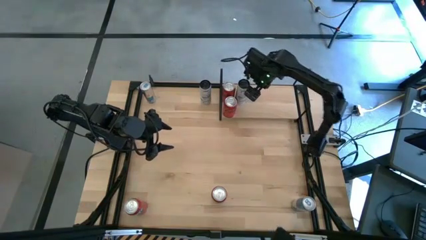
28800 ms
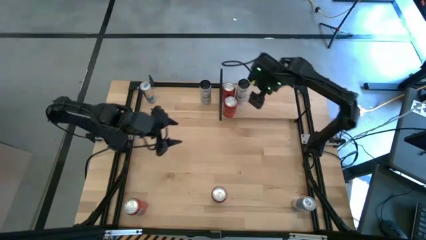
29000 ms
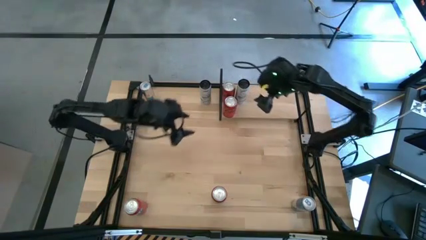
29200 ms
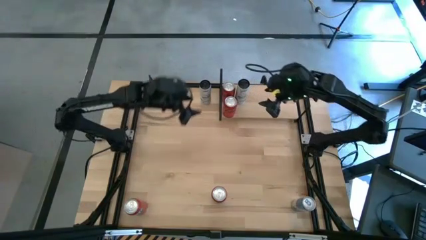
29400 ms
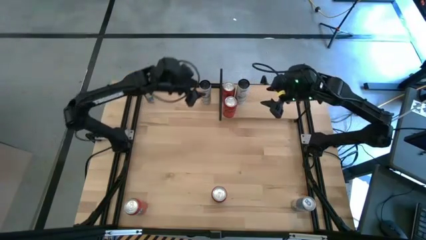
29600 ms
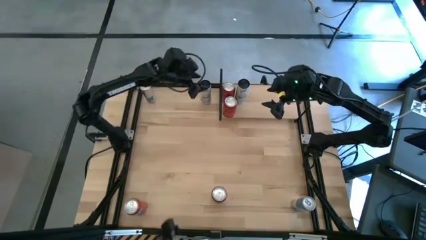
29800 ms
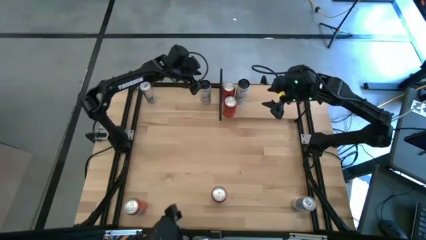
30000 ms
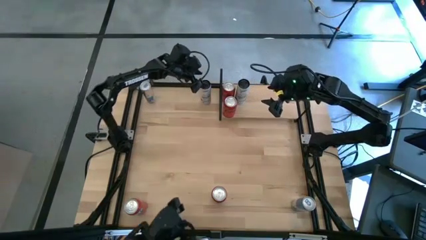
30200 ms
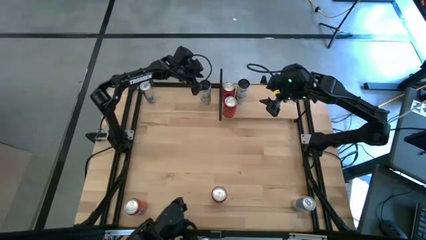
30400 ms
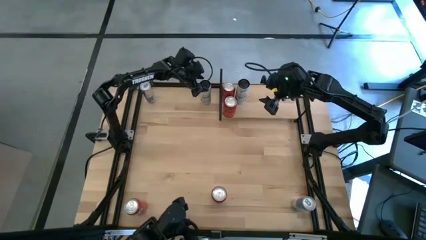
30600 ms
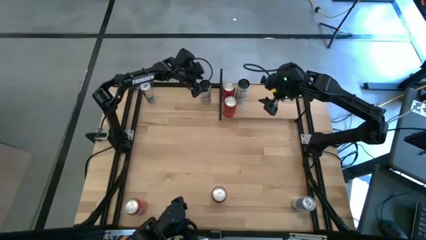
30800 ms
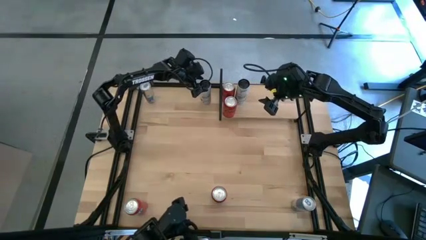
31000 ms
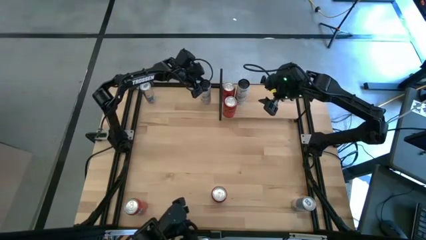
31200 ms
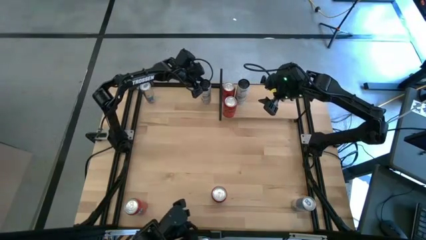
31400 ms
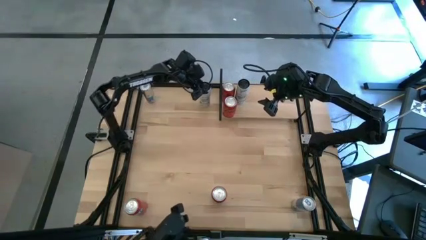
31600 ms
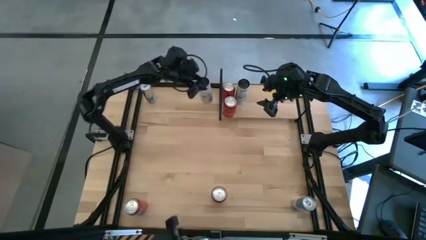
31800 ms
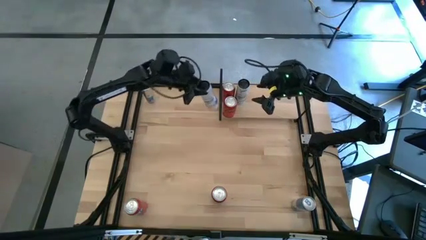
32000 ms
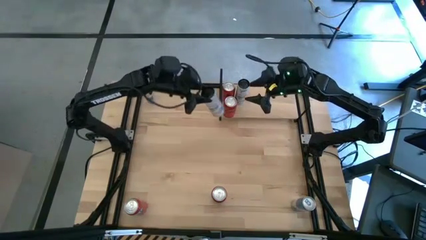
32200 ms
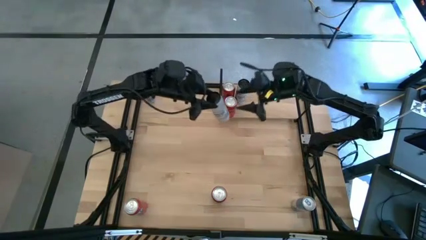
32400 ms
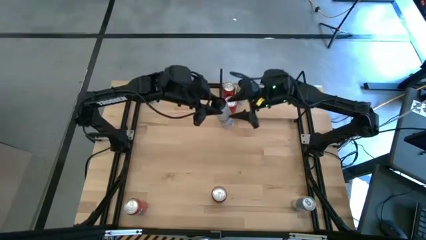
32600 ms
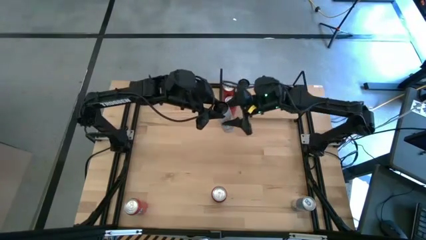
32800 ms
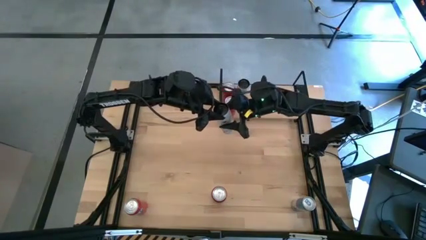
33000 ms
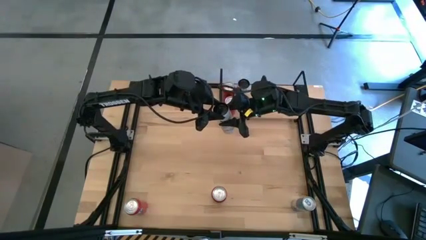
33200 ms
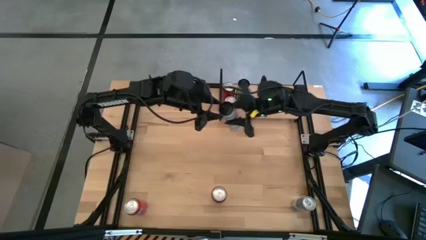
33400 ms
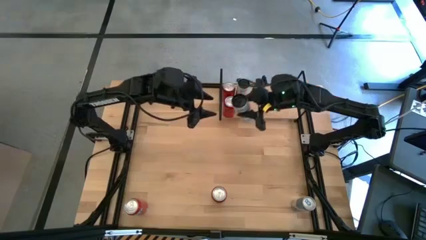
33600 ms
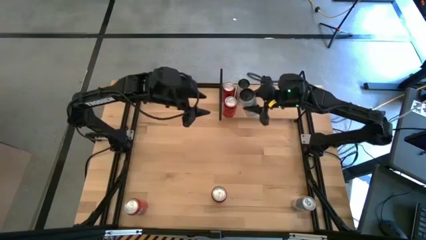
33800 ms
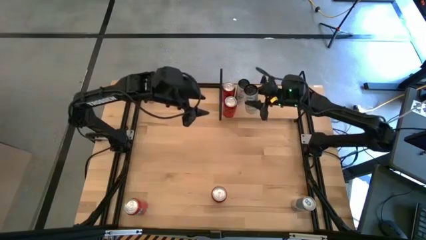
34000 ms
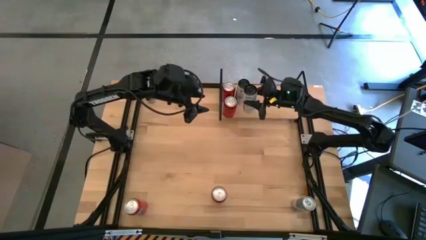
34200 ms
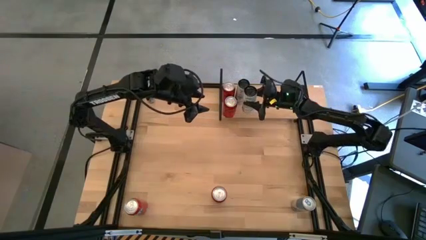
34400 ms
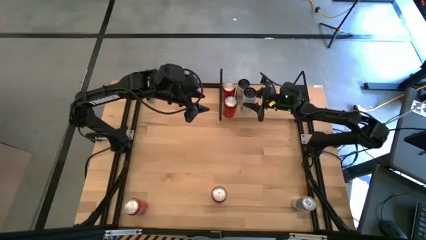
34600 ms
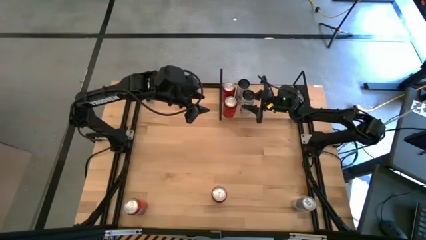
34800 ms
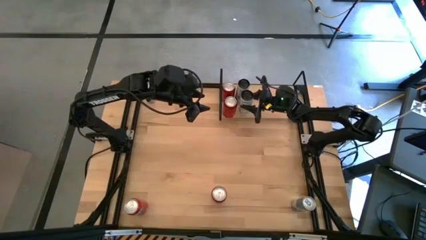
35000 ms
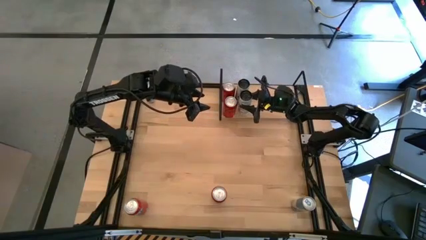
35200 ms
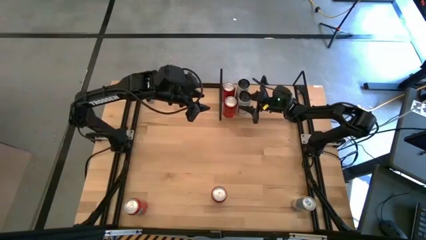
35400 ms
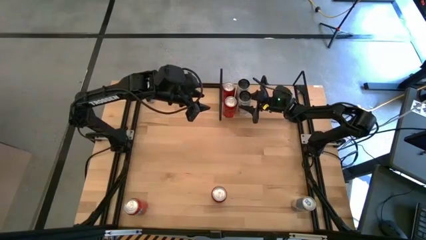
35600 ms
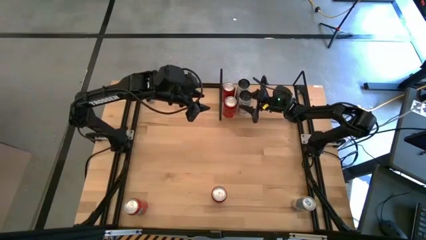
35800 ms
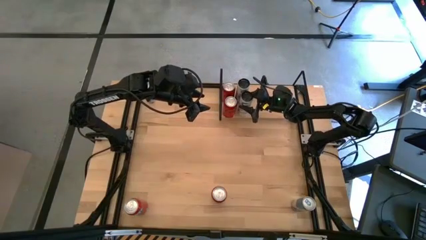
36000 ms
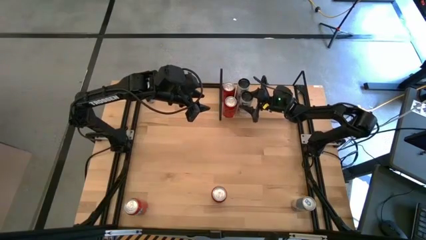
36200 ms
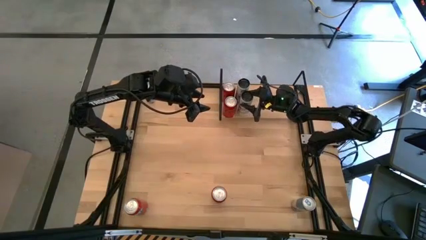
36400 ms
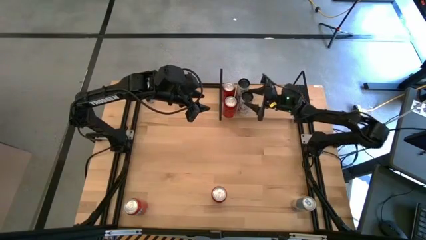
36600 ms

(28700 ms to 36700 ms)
Task: Place canned beverage on shelf
Put the white-blue soda can on the shelf aligned with other white-blue soda can

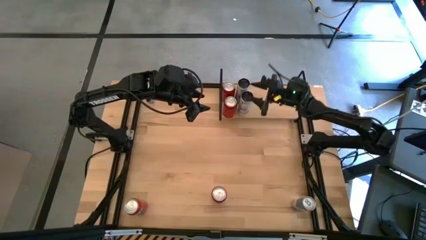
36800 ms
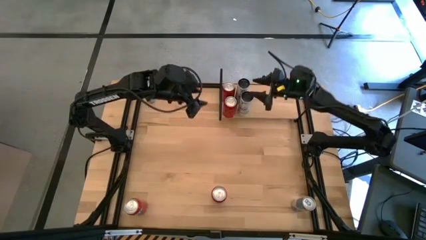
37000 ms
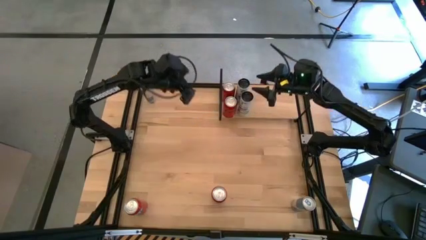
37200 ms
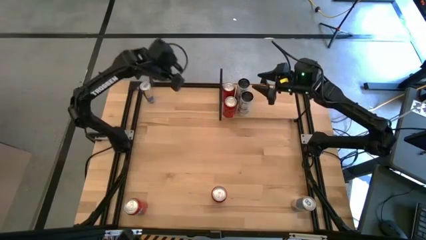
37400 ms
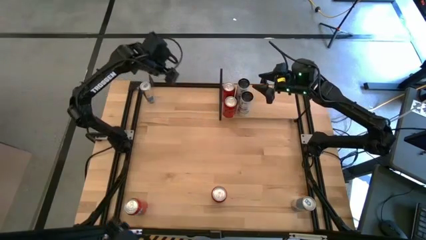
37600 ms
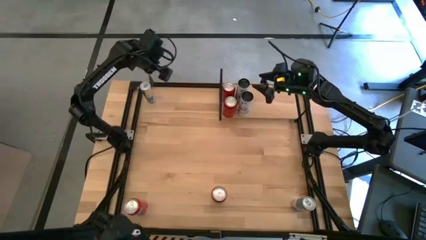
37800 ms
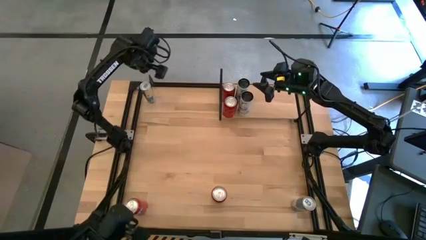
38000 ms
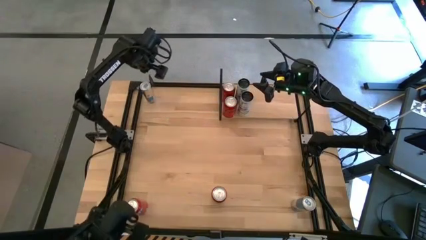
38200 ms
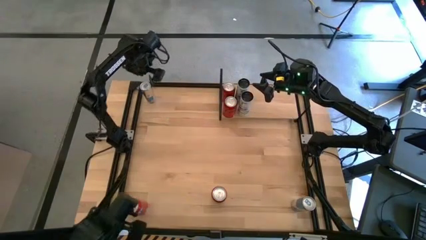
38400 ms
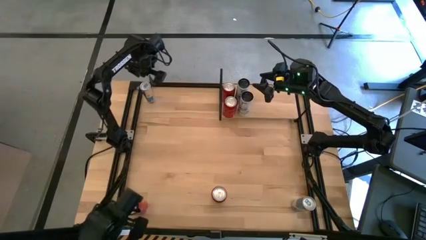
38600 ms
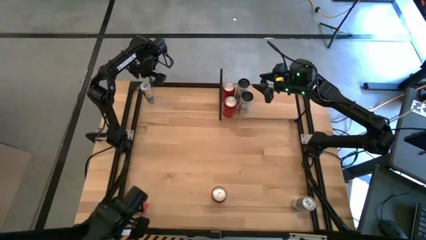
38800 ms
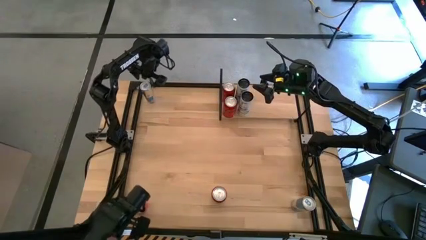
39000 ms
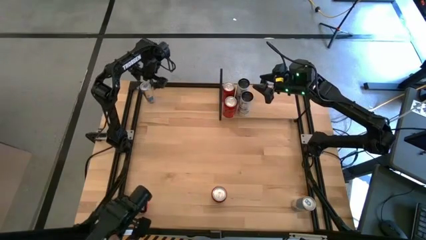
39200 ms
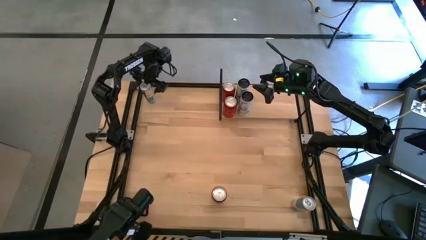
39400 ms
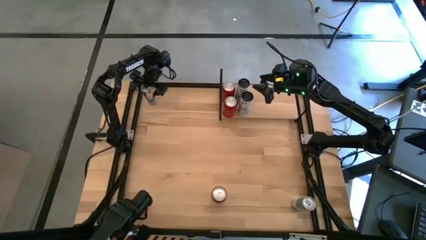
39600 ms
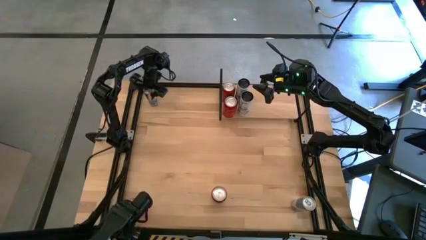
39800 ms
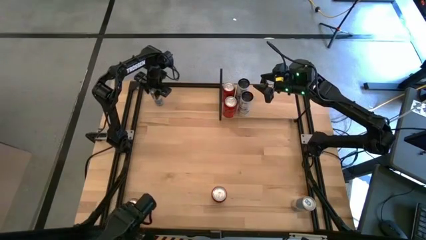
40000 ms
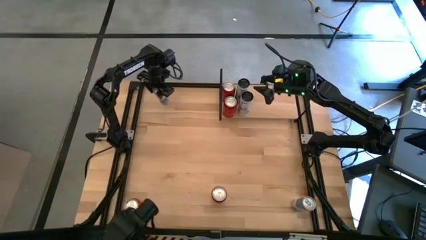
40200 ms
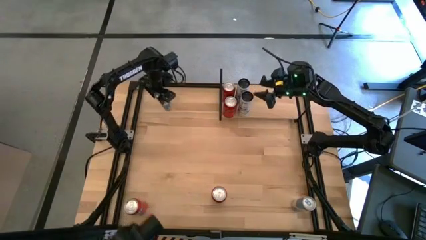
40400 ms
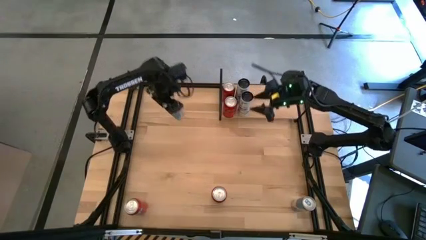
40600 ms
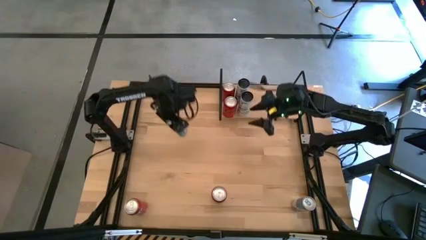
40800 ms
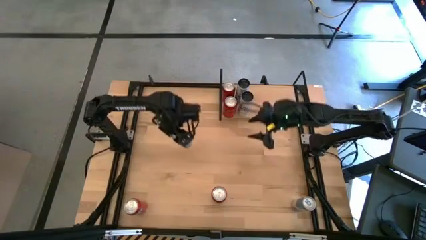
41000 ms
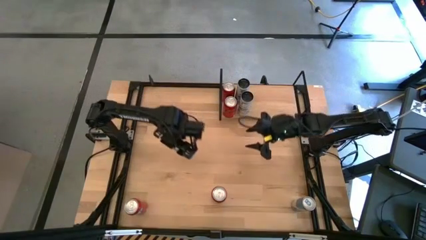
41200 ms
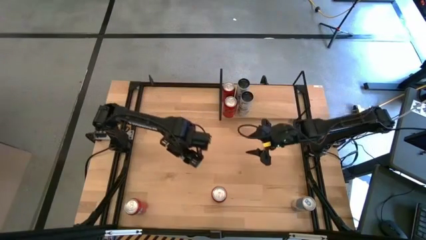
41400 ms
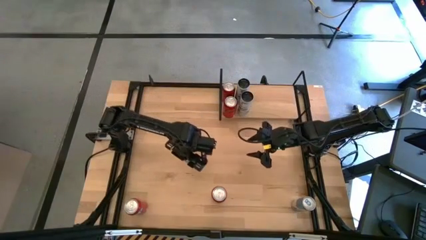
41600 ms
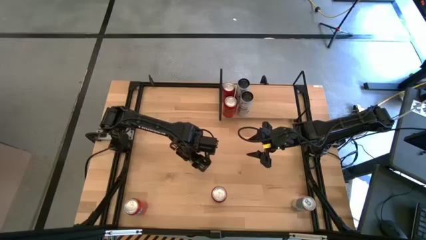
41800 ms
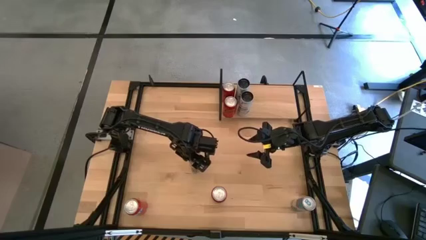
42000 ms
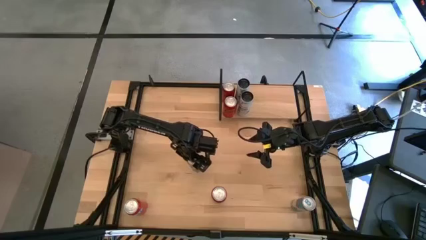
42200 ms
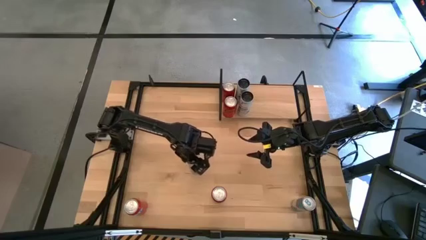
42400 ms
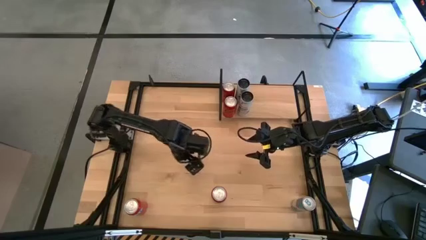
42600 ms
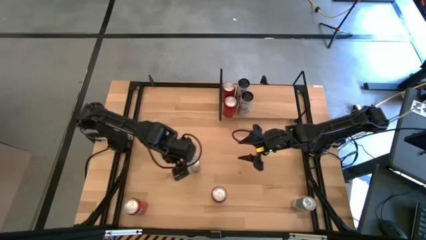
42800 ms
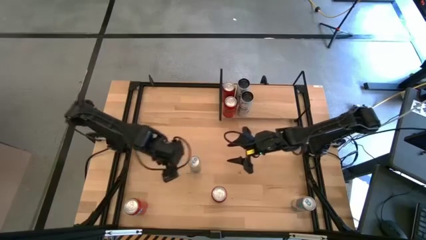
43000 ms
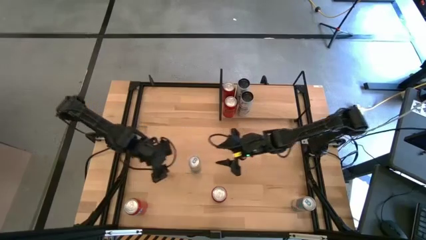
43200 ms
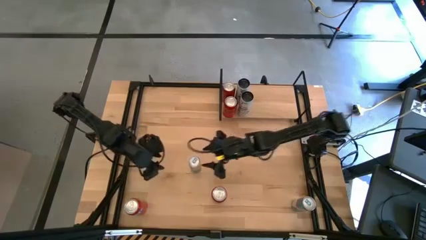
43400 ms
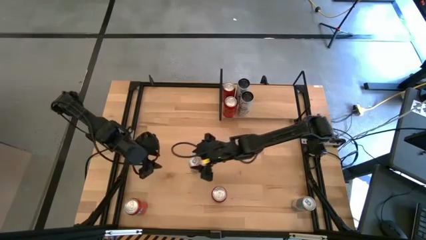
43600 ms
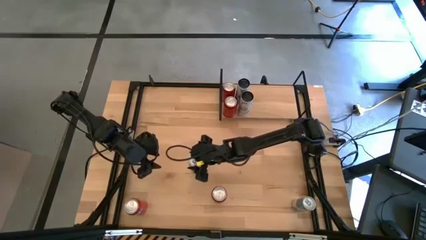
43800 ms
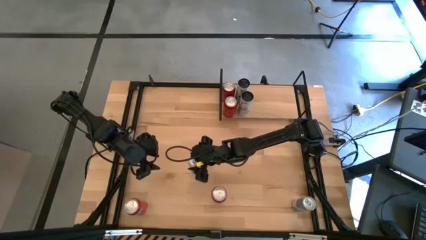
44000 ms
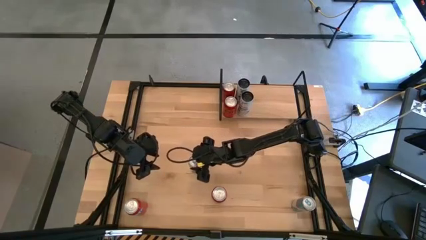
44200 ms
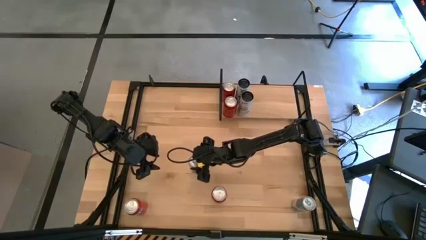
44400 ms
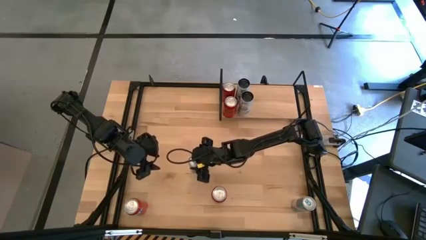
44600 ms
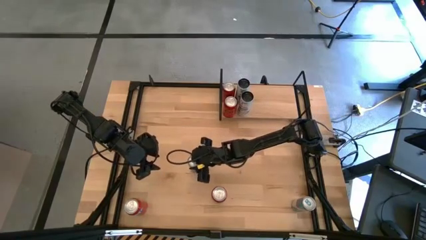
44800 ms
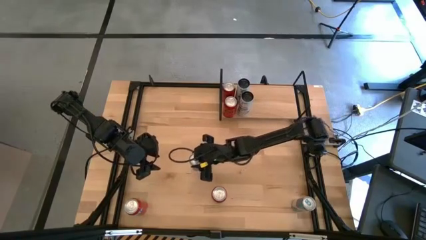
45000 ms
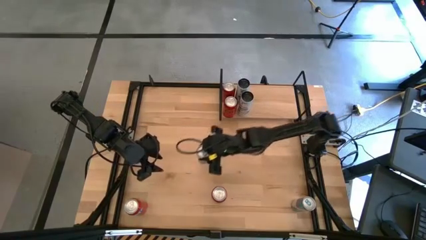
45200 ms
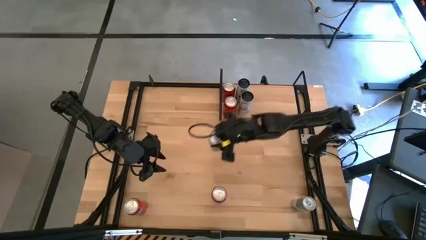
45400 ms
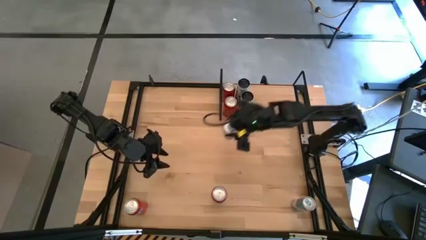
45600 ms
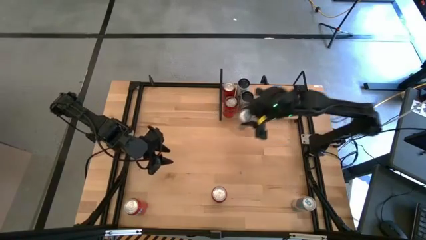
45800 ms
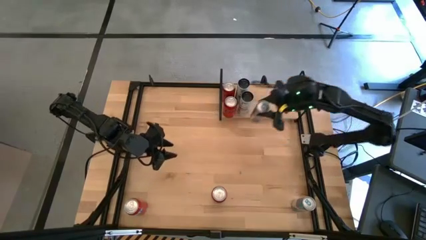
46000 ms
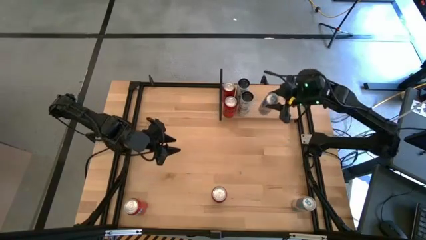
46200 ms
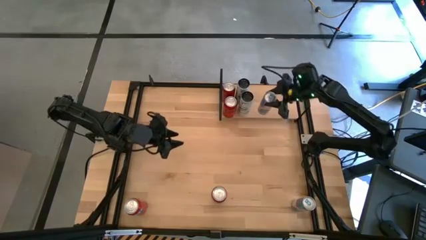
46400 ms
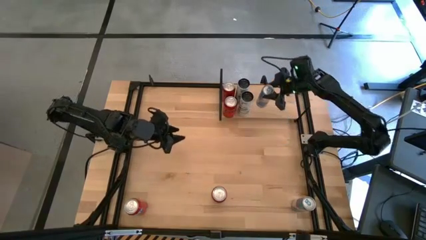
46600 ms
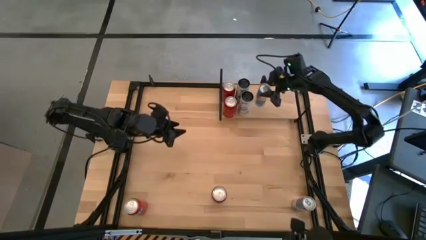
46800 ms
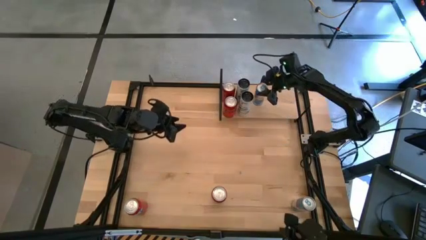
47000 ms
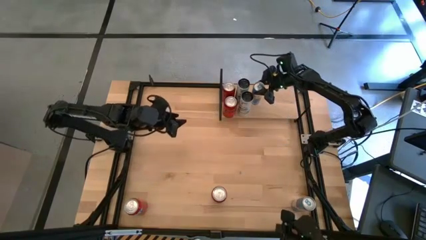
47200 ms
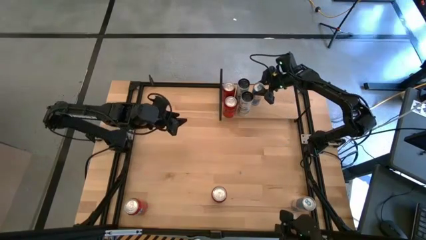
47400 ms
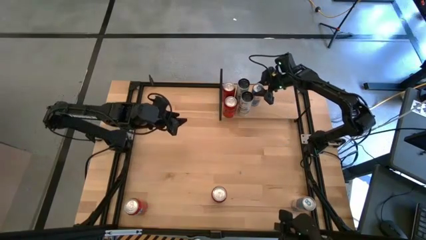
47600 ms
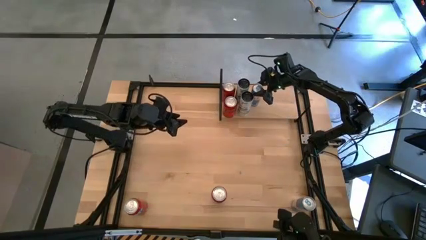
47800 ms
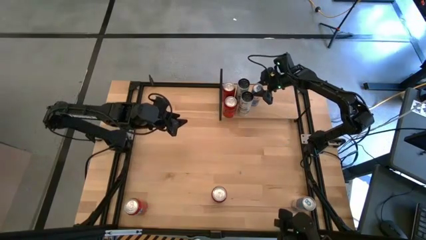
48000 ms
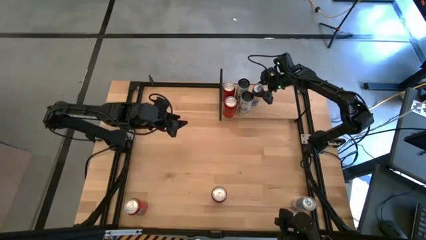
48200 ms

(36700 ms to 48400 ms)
Put the top white-blue soda can on the shelf
